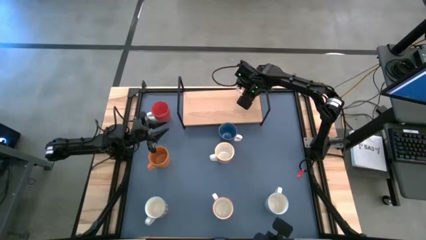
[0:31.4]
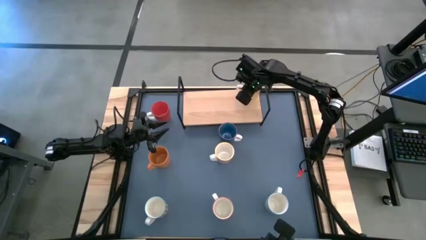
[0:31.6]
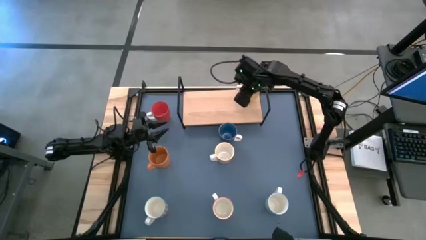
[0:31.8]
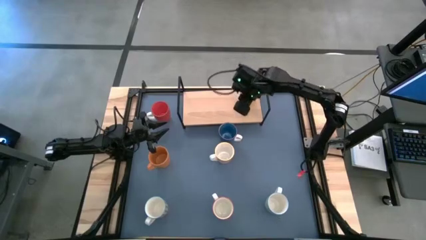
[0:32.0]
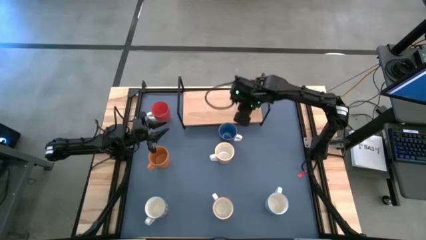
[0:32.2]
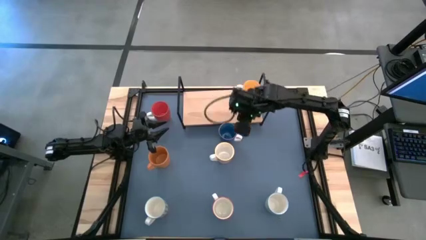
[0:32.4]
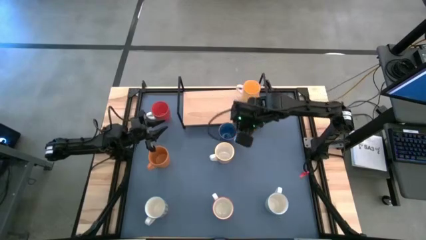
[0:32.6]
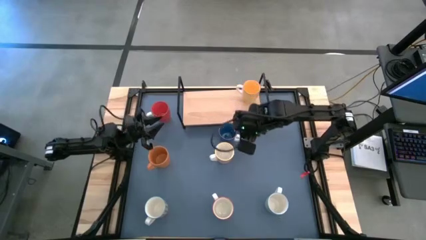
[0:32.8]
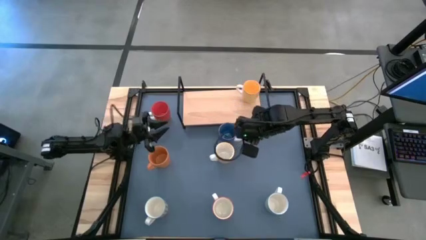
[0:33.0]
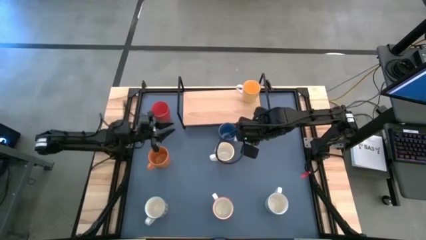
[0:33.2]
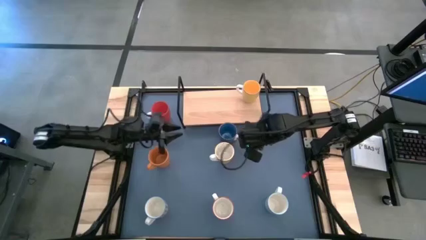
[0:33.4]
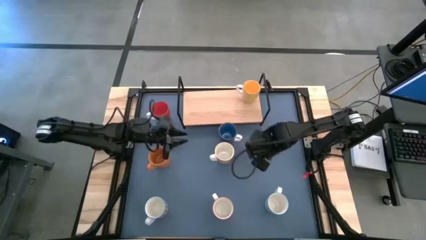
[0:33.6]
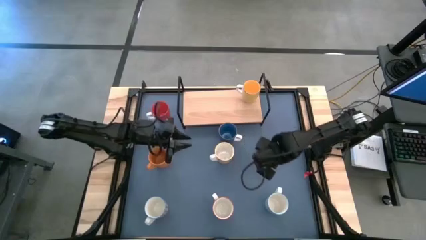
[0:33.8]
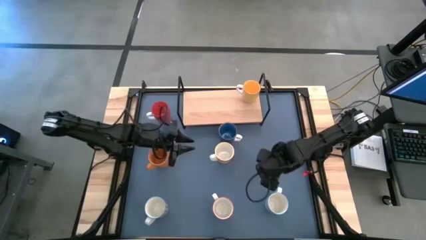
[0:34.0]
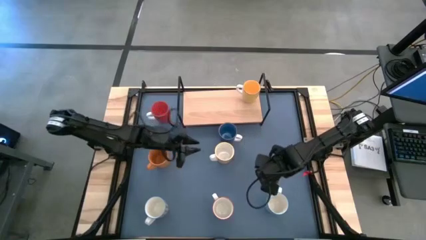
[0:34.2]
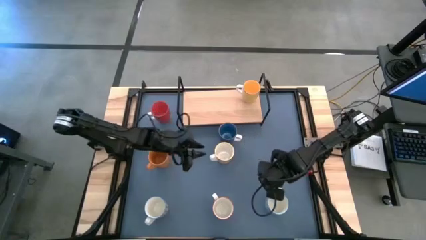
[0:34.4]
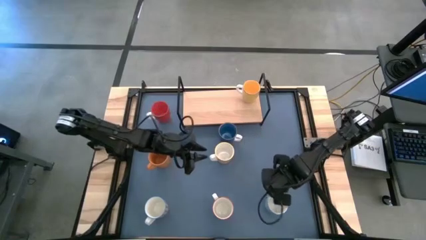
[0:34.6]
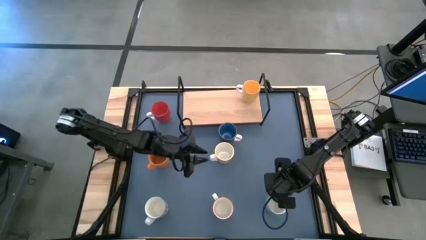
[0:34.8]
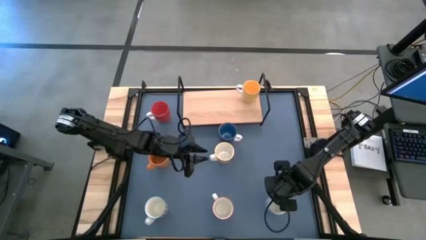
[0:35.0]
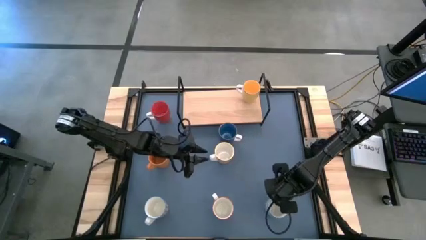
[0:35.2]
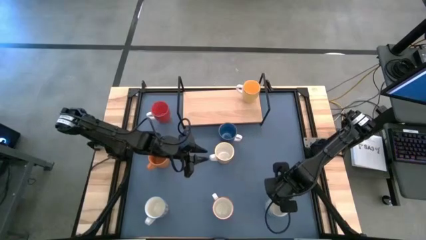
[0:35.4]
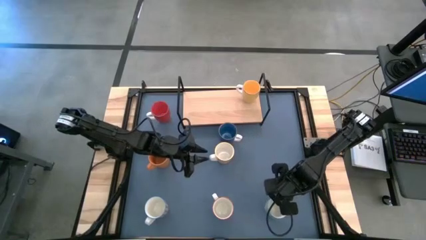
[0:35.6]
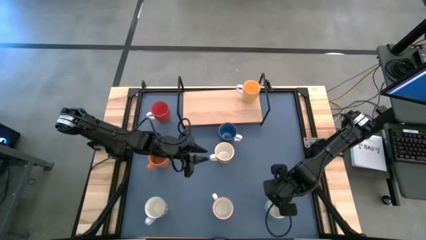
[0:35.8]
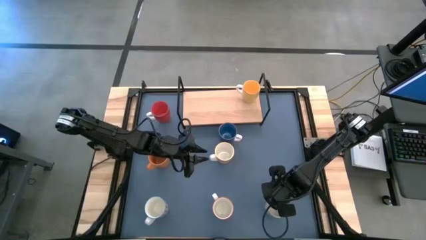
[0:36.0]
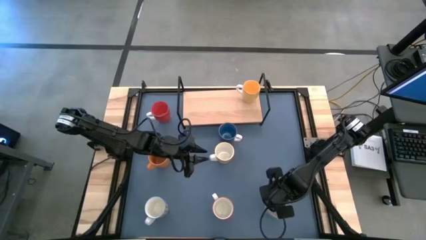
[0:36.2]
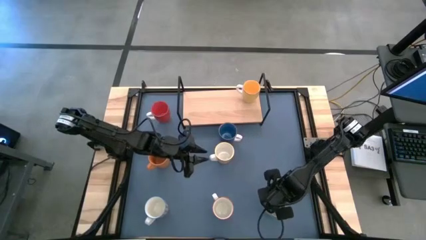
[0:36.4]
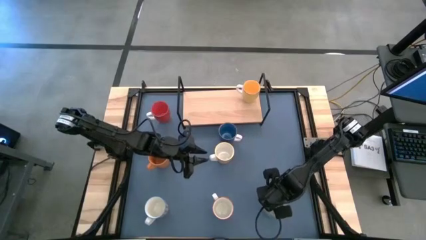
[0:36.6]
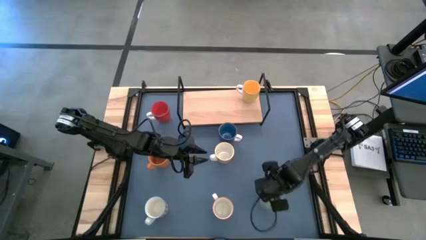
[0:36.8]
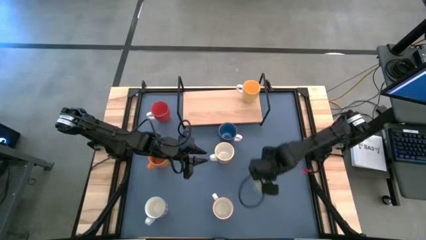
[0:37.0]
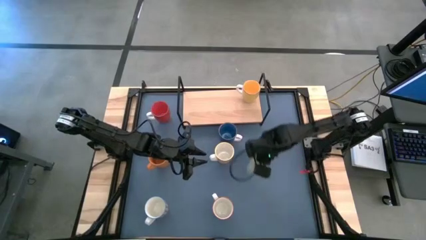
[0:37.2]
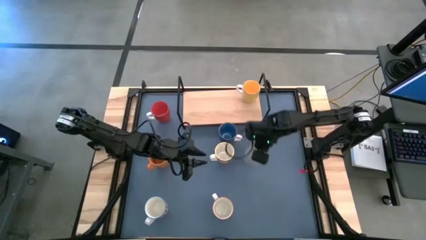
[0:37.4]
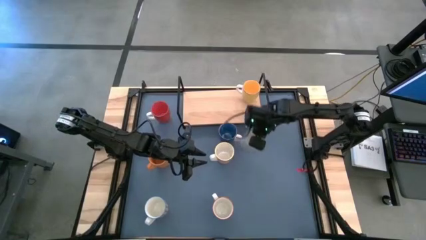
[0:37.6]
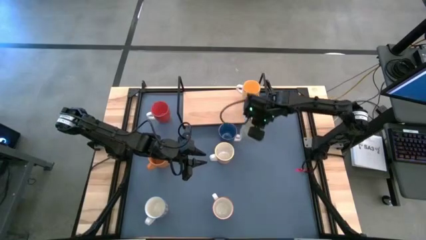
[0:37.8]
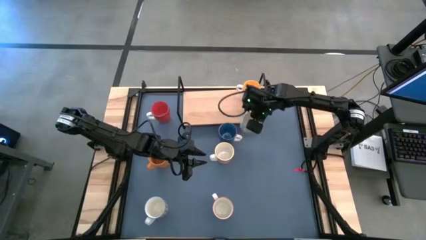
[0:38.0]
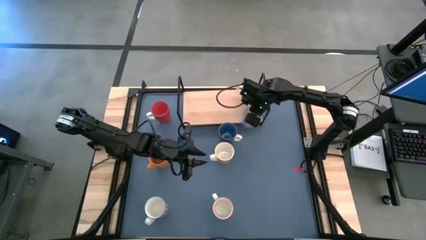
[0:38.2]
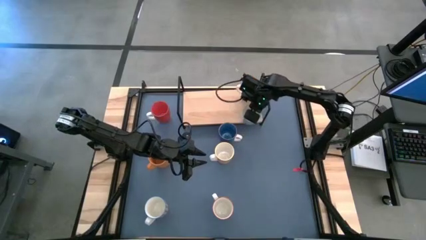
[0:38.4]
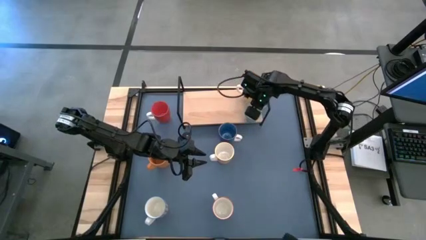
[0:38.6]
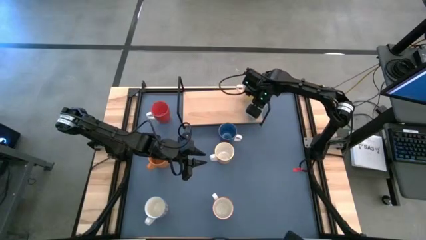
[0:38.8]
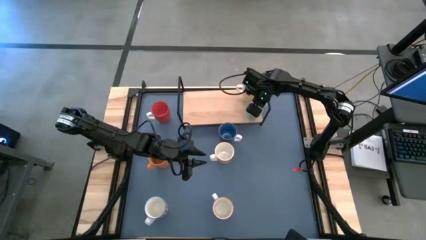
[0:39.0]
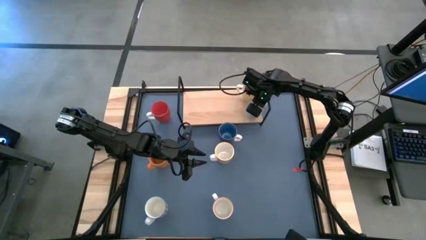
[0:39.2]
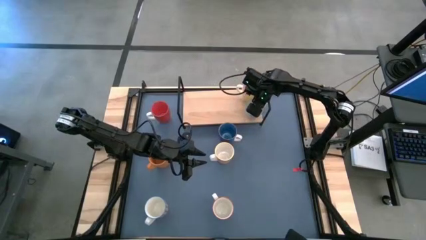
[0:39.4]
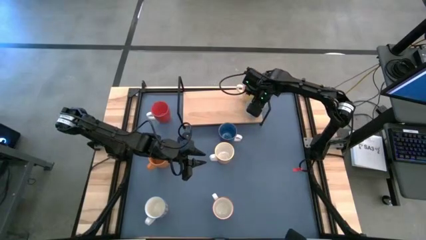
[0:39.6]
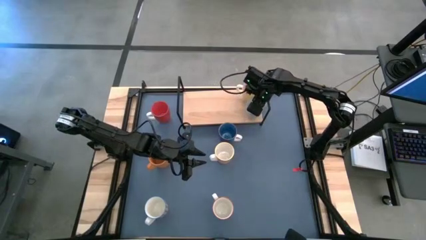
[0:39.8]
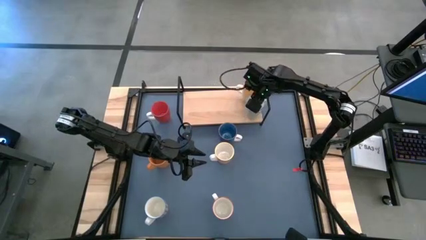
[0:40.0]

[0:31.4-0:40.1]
Task: Place coffee mugs
Put the green cup on the shelf aligned with the other yellow cup

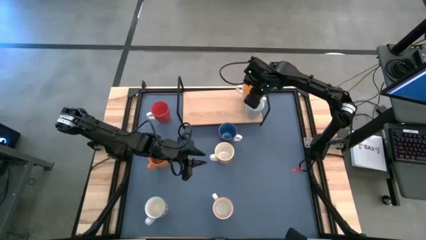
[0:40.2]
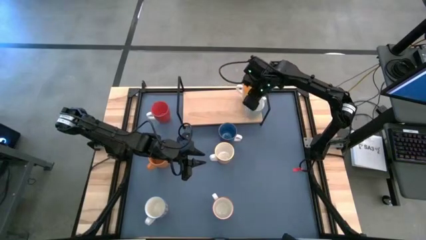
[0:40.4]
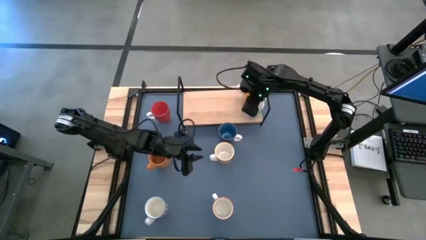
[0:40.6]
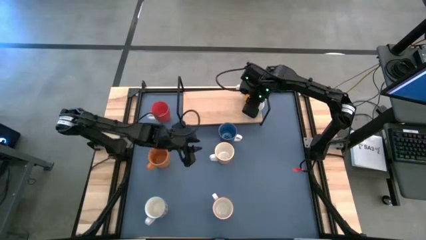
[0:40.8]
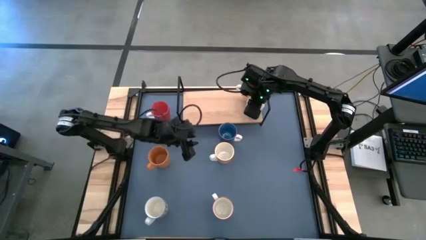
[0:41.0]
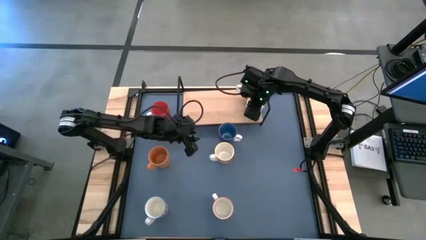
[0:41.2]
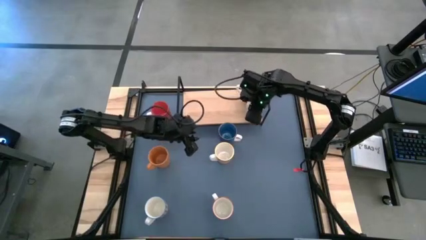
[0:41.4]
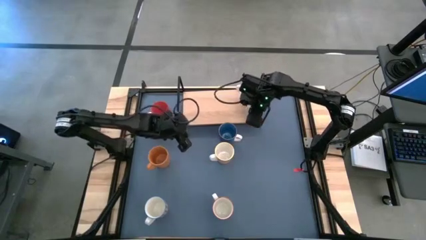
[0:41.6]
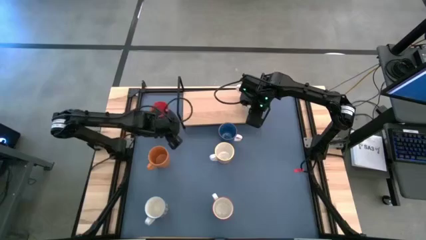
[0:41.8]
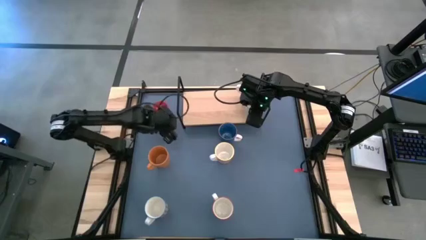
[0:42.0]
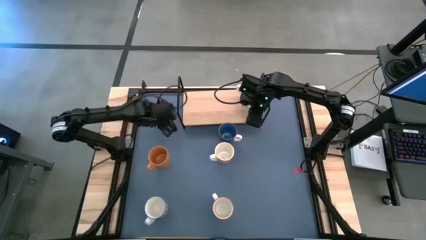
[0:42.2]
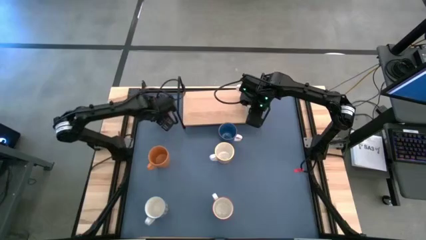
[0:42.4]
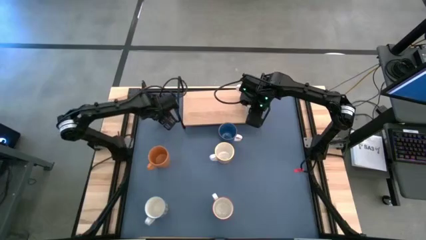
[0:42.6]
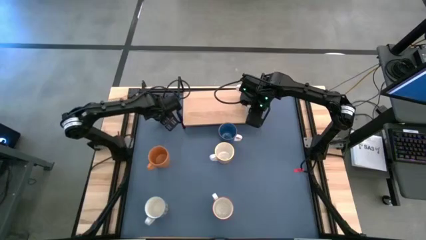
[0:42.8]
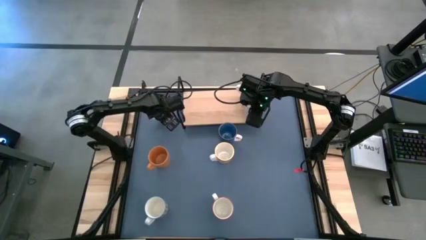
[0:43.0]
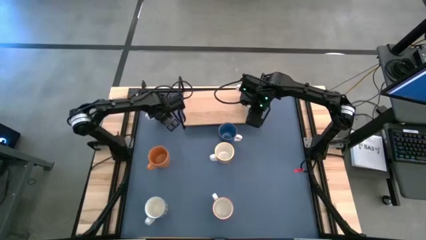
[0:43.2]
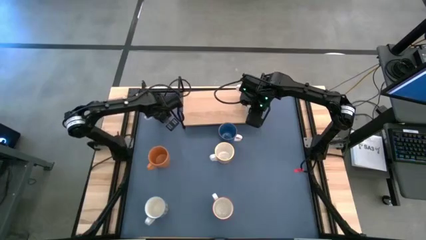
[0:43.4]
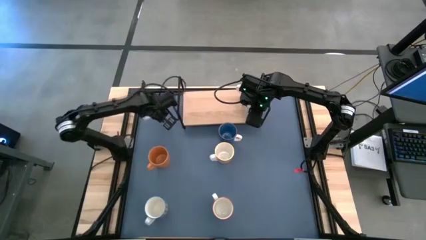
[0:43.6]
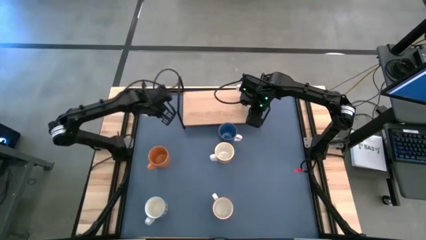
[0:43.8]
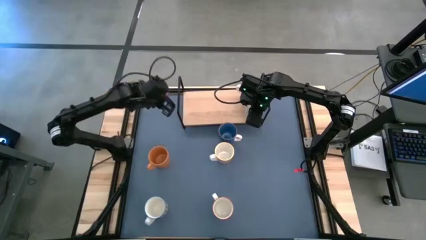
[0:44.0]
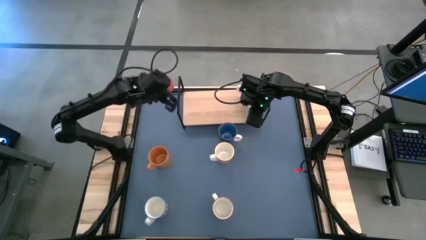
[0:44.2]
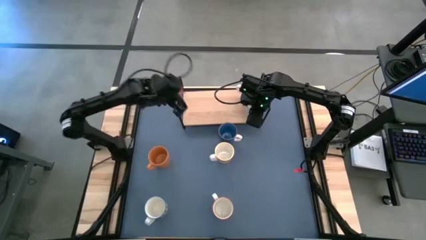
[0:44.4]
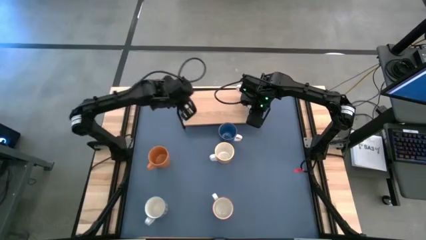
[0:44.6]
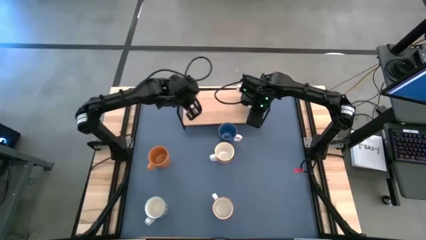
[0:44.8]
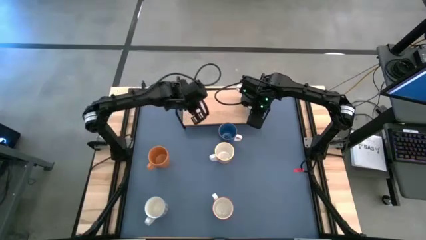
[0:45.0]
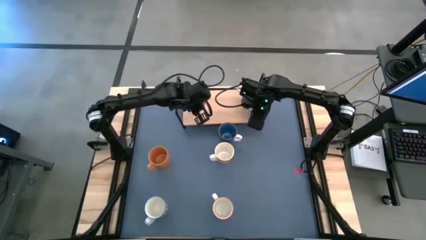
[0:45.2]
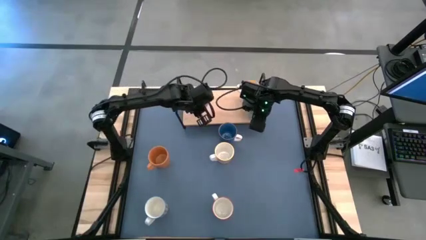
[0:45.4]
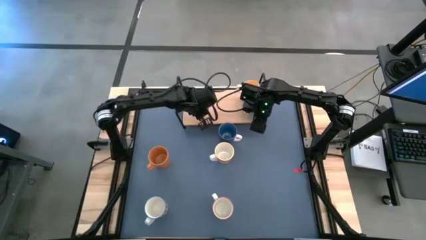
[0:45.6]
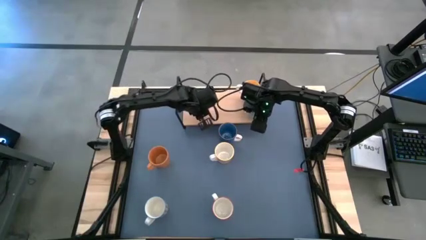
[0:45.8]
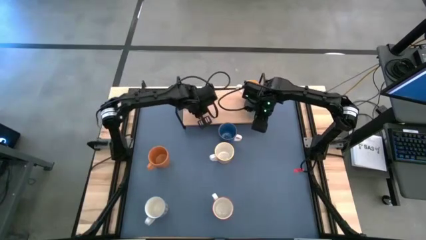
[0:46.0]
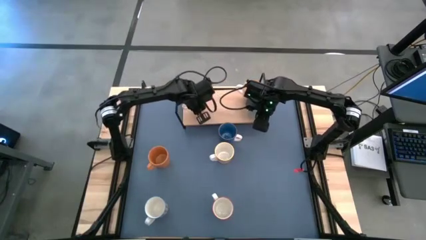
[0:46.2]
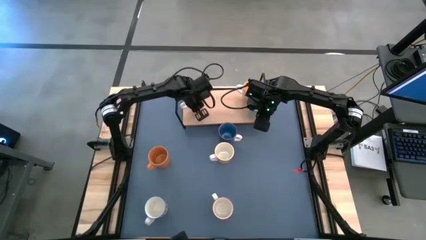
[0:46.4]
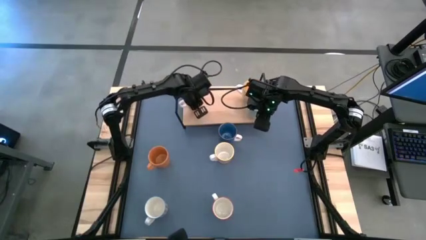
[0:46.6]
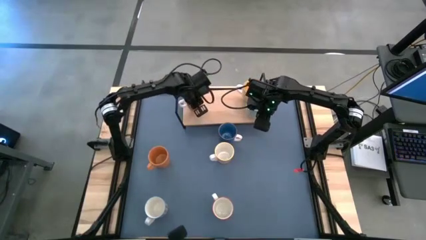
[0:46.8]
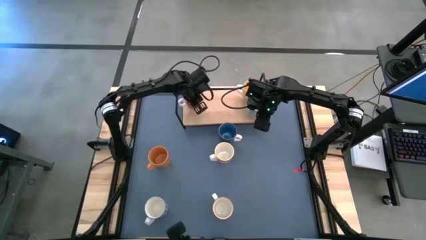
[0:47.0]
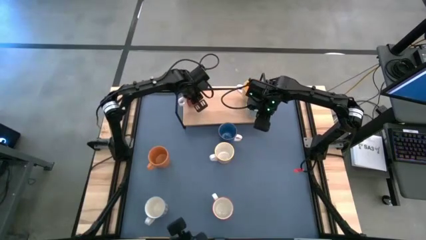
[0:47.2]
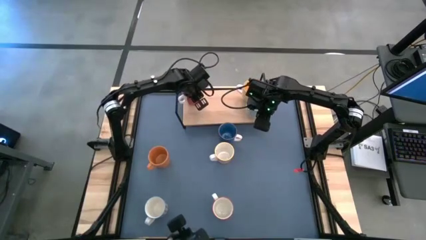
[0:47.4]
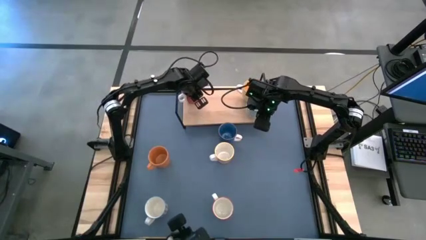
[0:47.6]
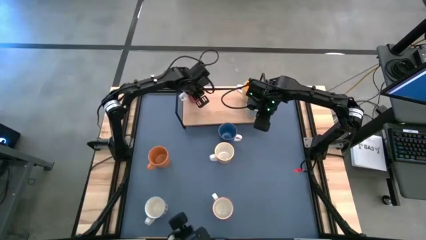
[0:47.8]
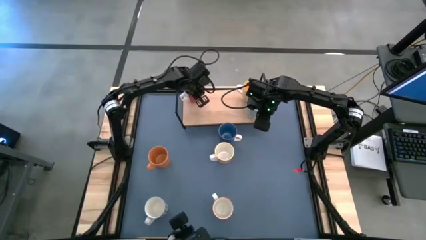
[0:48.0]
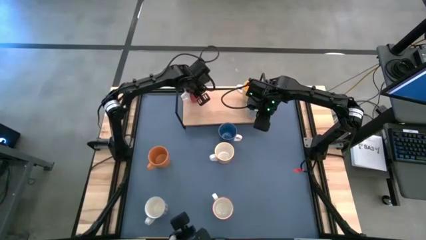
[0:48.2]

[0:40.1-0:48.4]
Put the red cup on the shelf
